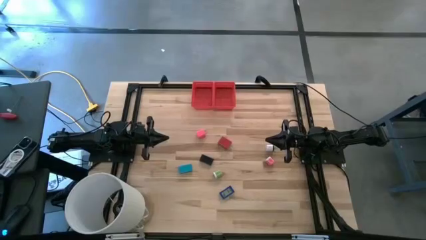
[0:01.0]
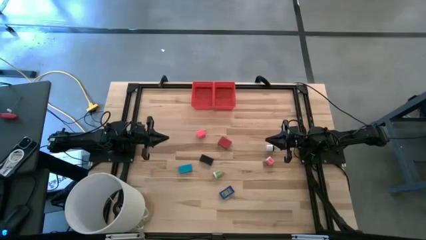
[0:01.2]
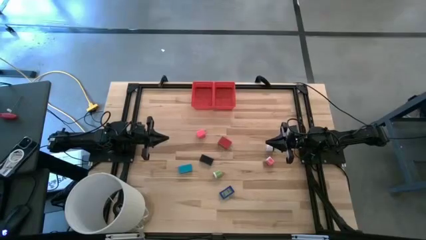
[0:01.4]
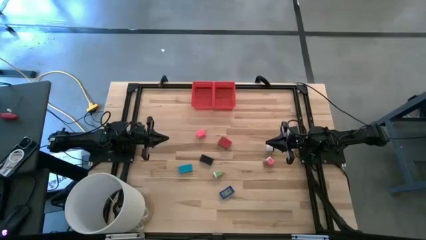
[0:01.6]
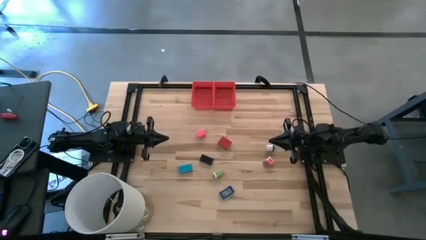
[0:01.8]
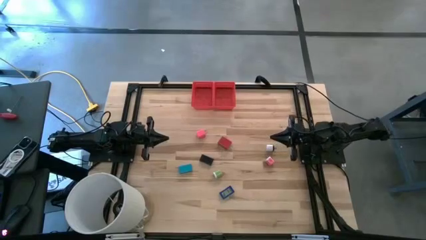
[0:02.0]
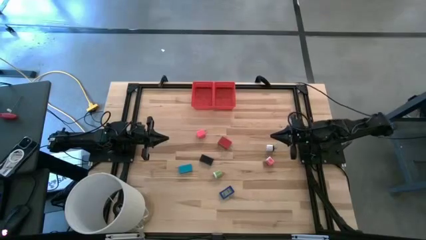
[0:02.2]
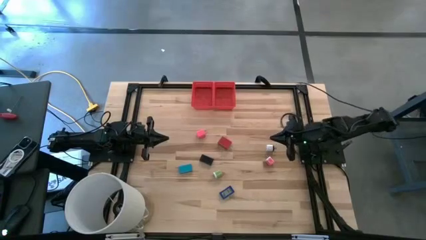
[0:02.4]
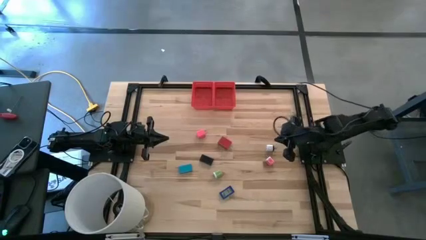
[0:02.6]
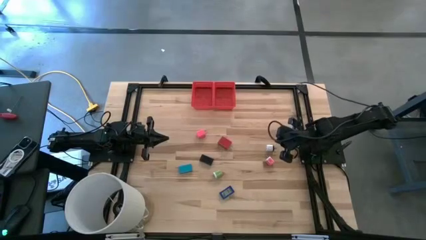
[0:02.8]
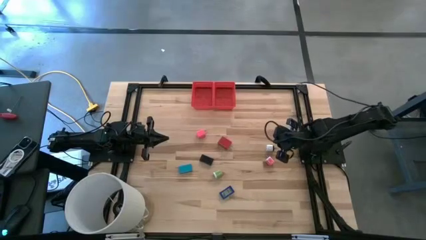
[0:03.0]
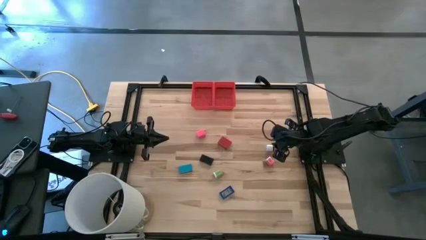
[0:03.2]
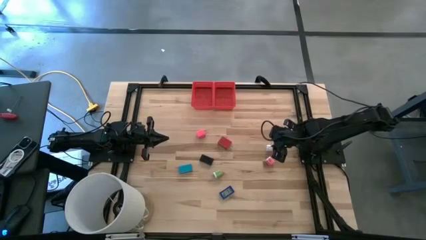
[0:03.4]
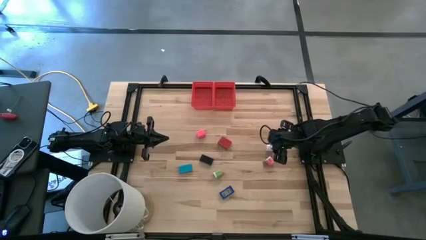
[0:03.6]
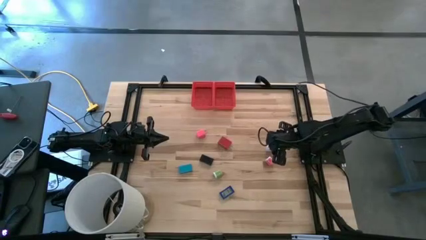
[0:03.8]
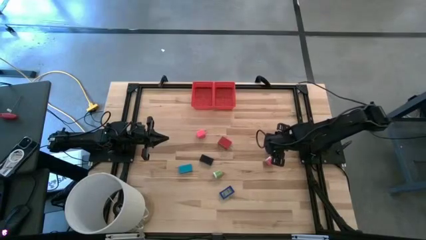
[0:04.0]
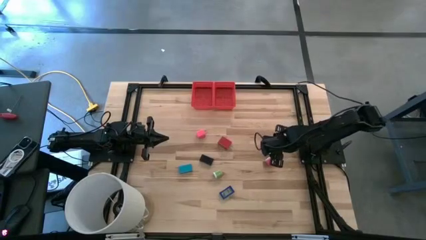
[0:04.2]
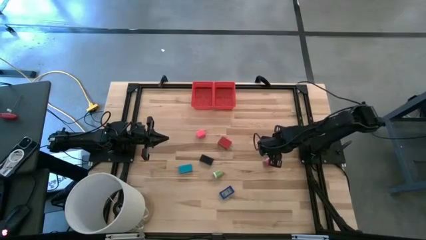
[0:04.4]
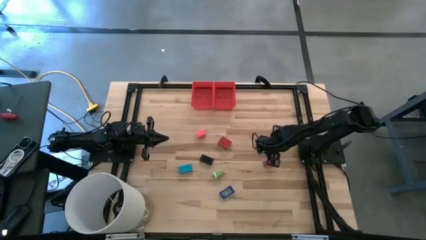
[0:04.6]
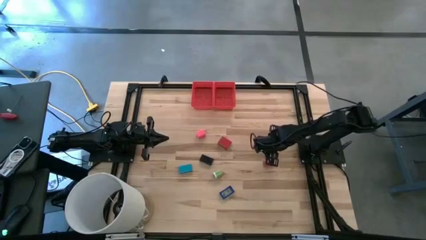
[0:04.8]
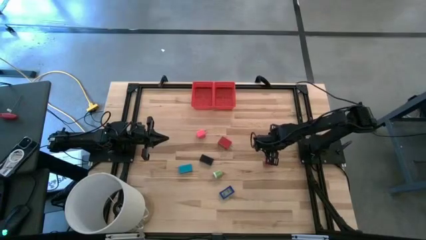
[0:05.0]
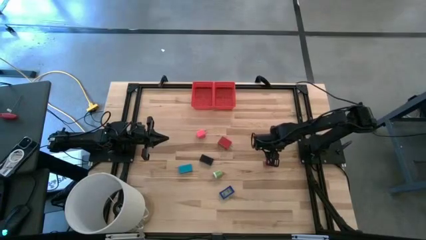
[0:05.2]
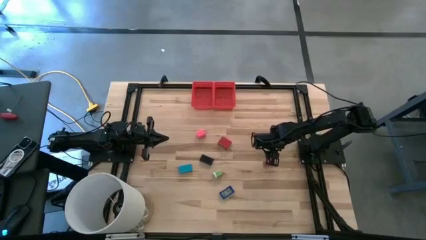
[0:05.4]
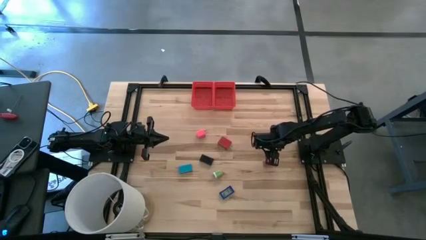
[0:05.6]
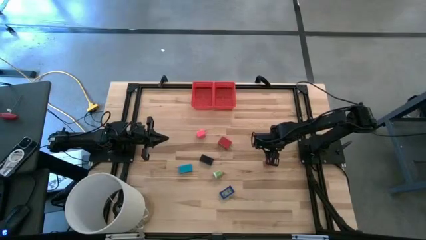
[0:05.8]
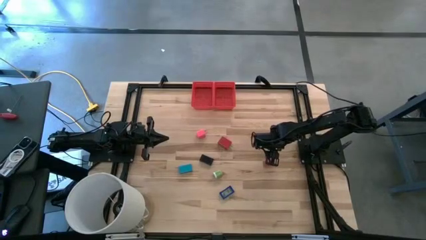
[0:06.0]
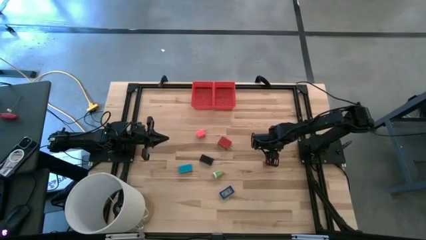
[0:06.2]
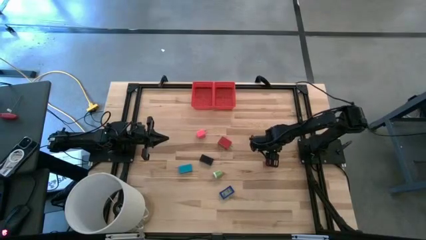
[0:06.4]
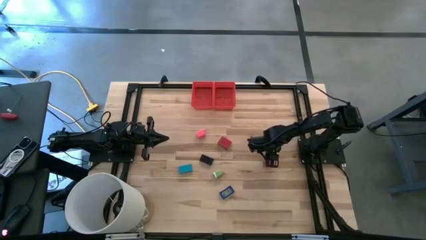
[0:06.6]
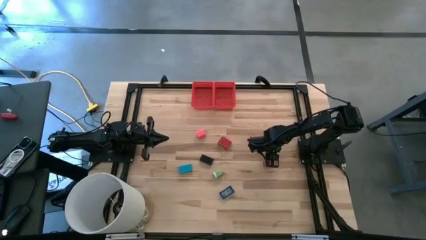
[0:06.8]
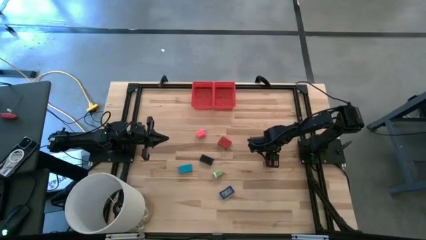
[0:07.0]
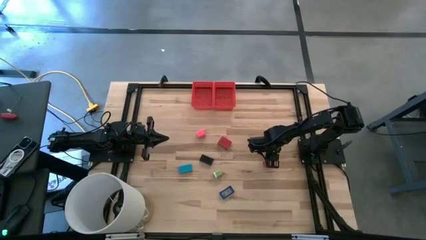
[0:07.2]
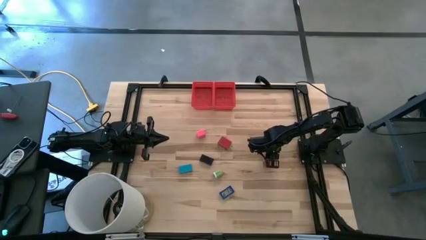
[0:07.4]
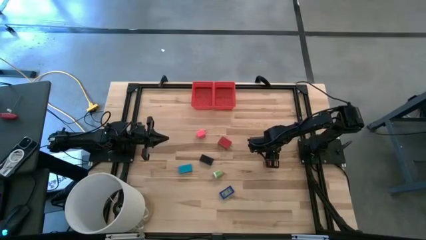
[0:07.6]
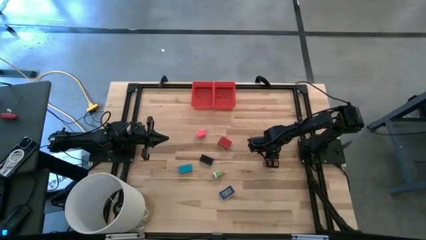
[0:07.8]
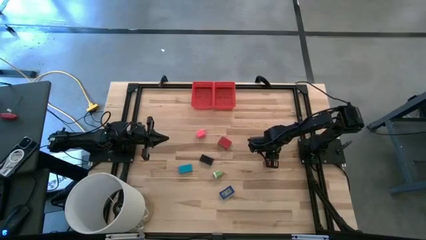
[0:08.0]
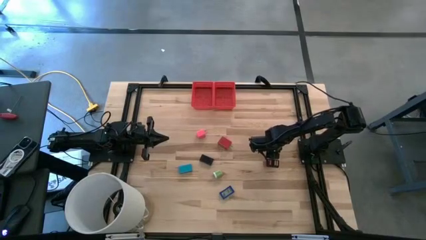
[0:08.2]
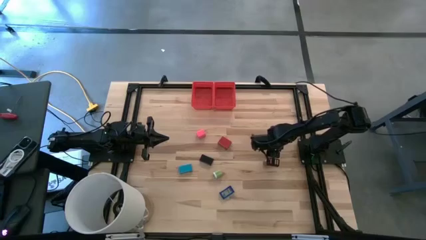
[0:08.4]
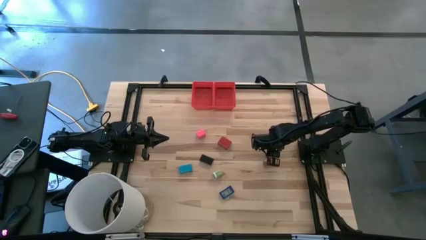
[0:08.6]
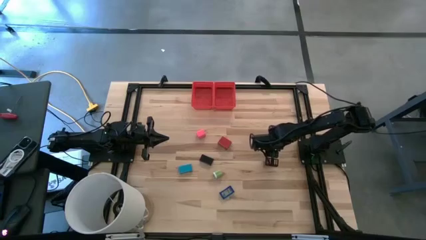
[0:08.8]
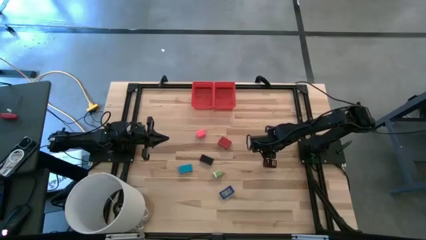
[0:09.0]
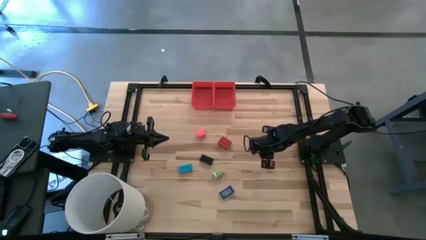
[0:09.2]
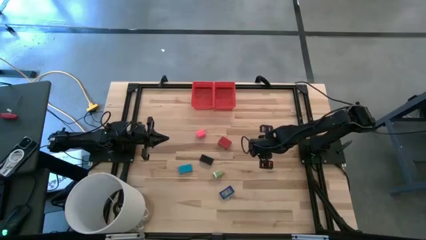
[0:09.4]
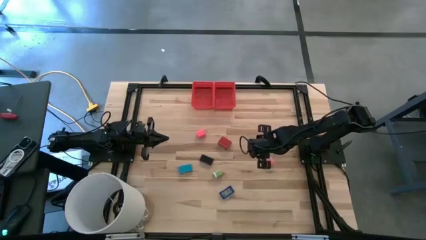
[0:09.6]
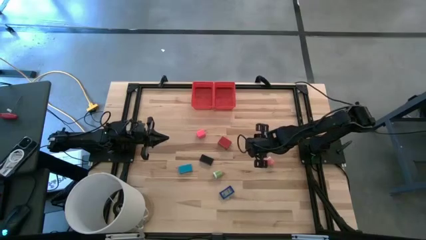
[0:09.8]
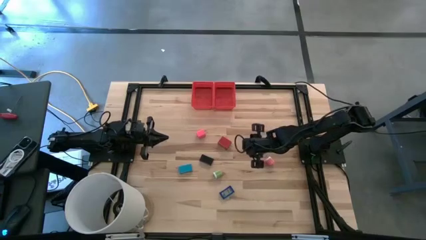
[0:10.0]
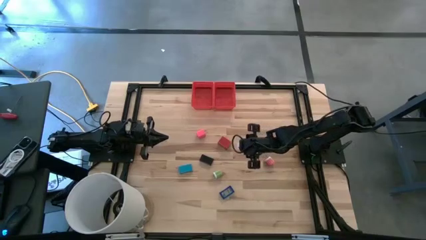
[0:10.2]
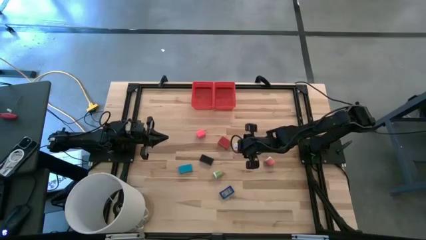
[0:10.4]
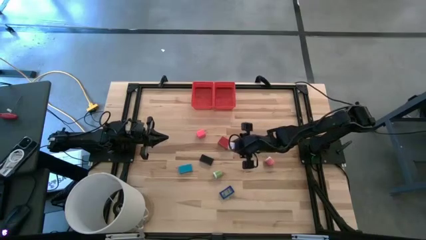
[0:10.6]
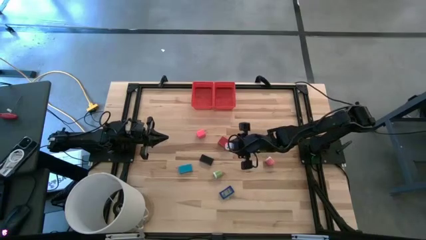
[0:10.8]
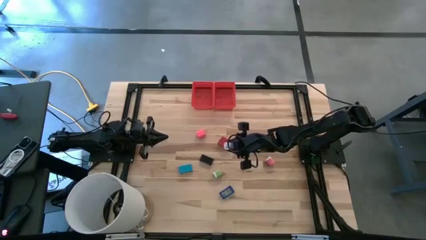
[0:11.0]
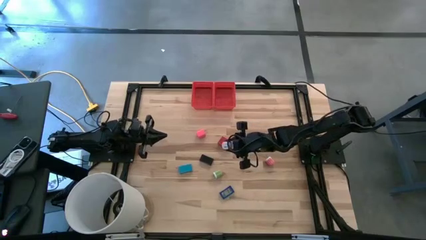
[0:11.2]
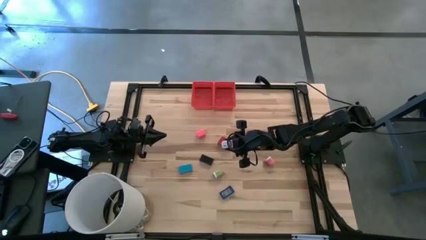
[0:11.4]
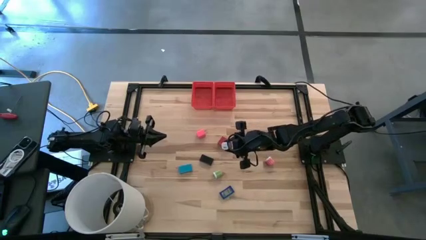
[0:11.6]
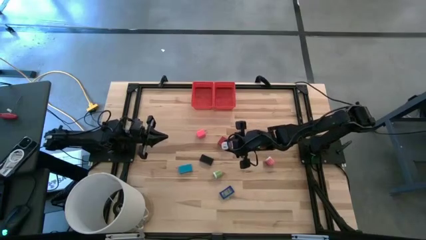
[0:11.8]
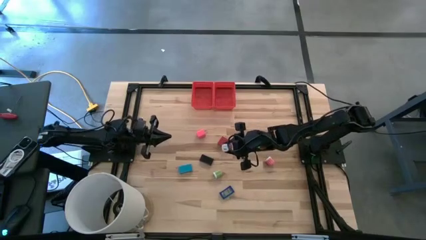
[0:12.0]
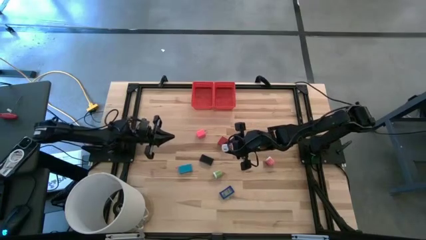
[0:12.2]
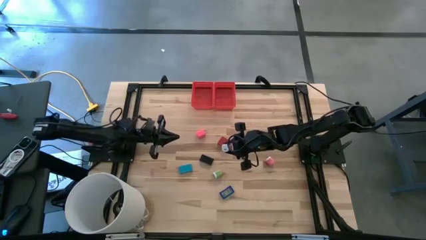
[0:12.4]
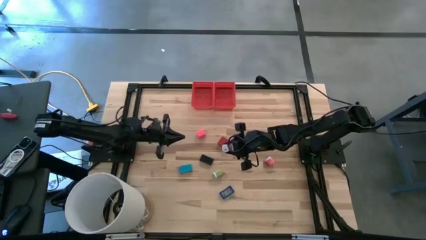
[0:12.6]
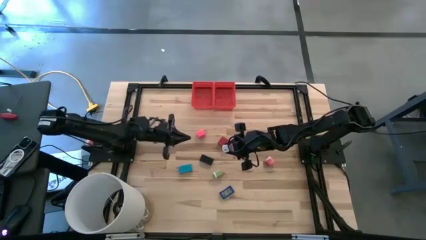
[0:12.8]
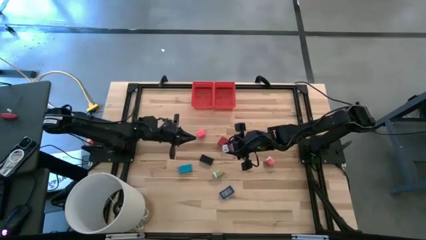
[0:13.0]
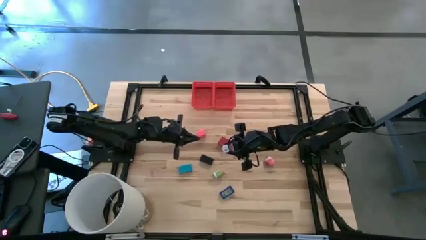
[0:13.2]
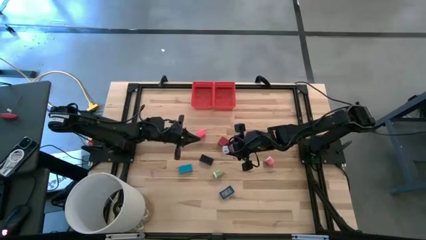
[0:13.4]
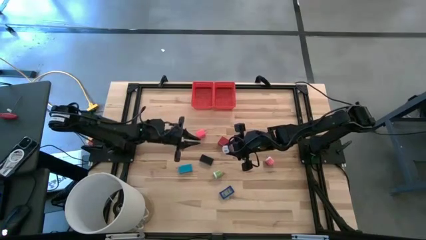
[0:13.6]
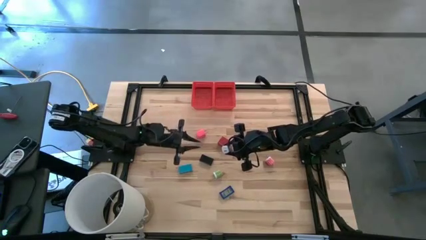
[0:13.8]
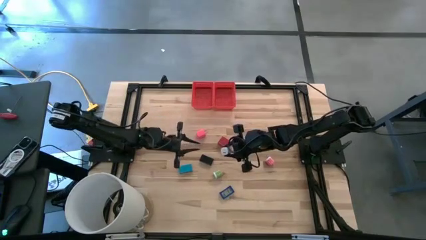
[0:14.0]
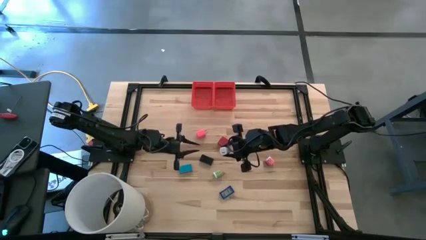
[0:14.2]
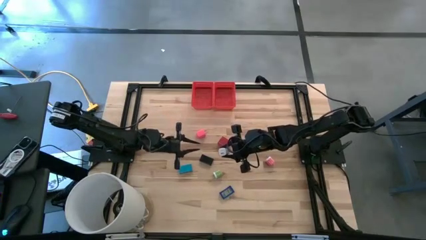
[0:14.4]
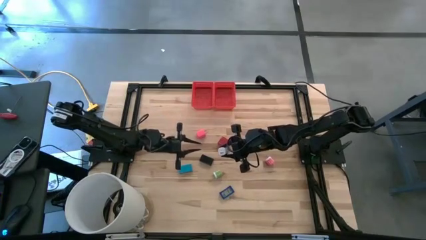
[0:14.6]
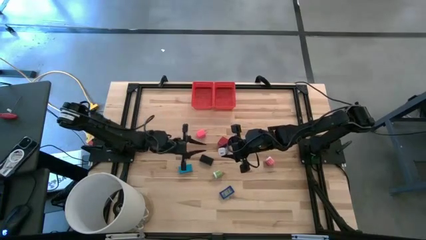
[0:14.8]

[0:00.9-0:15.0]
Task: Pick & Place Office items
Put the white charger adapter into the left red basket
